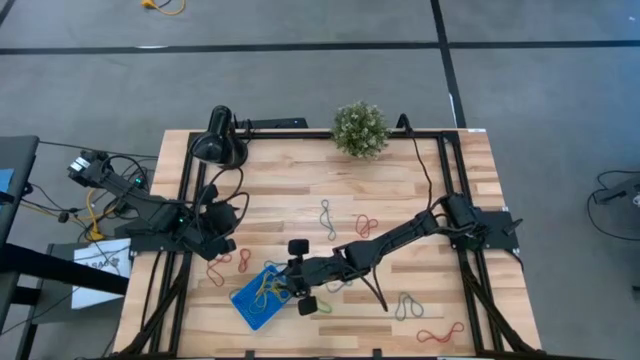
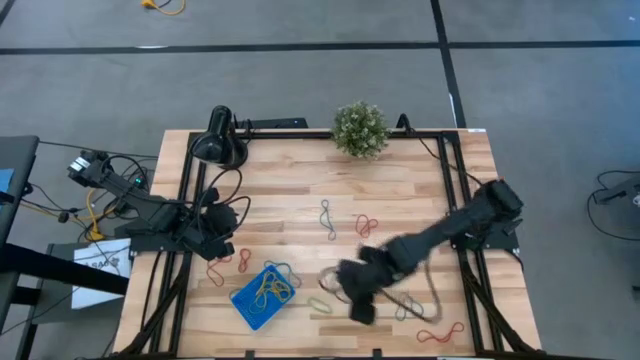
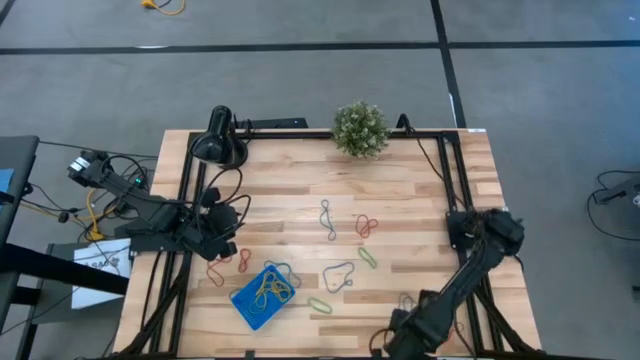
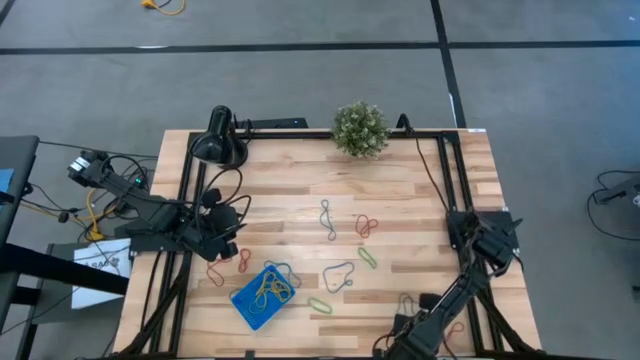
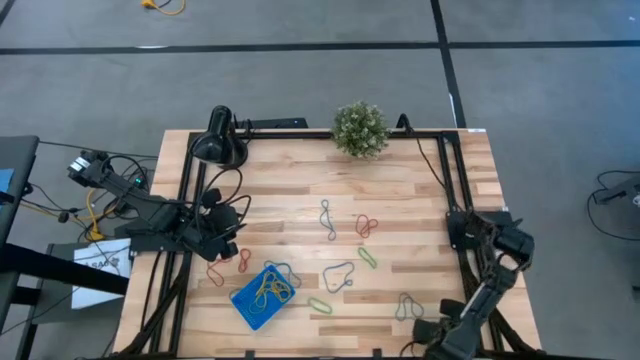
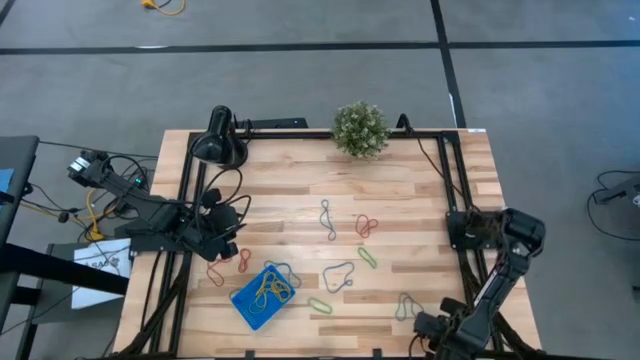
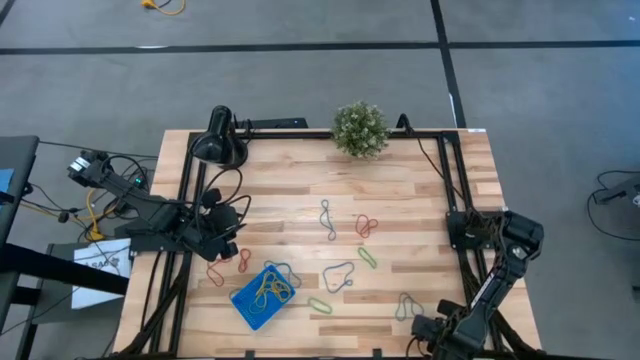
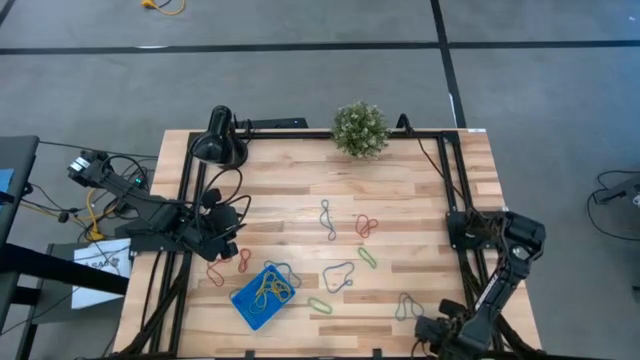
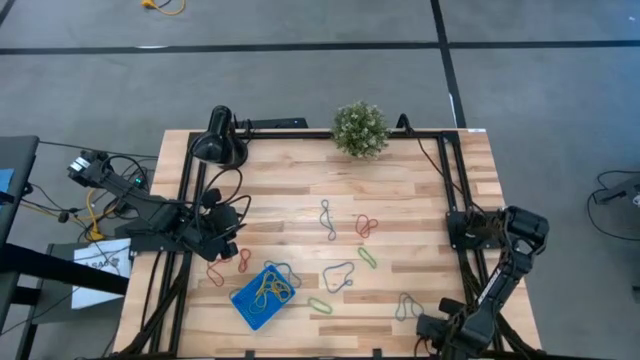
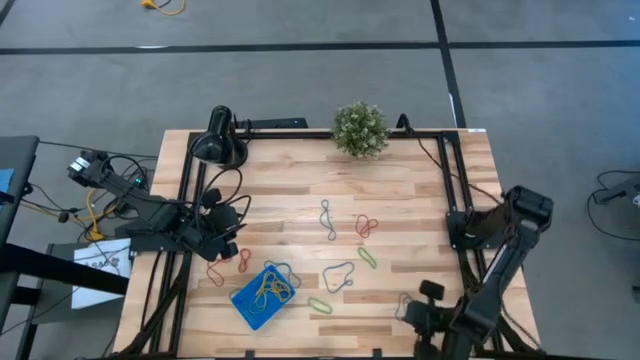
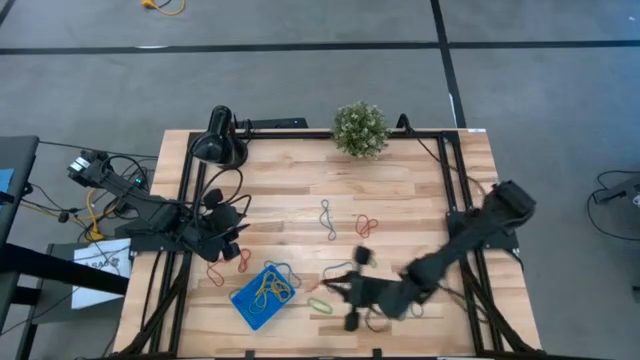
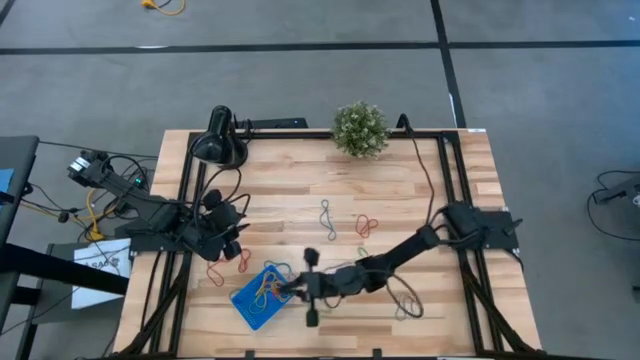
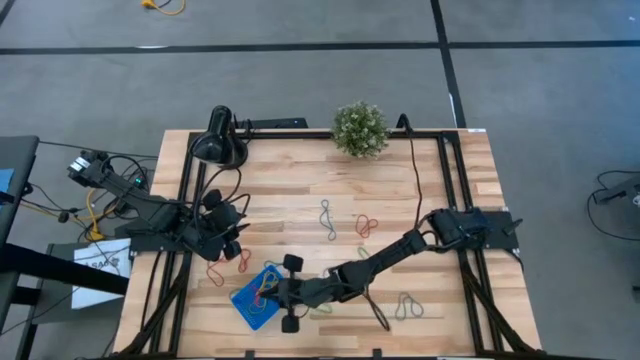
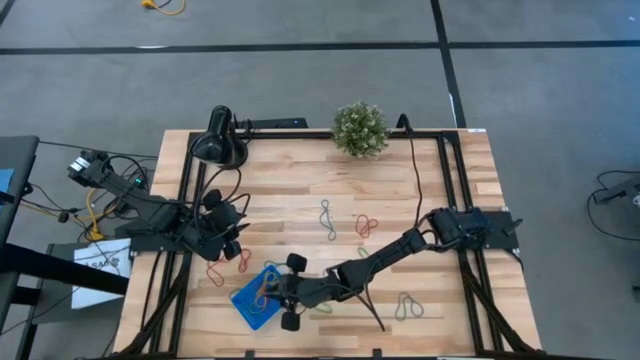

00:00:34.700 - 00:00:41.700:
Task: Pick and place rubber bands into bin
Put the red rubber band into the blue basket

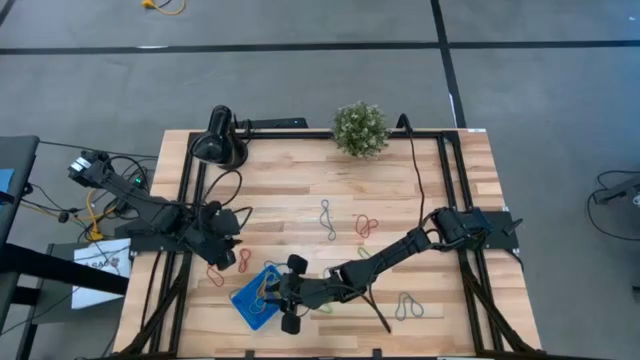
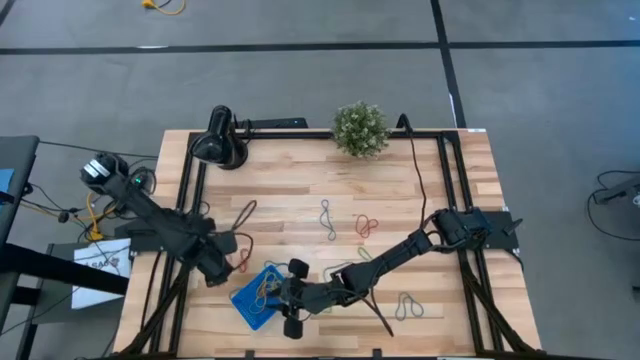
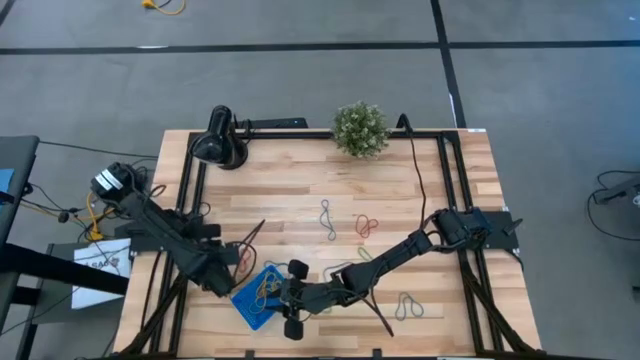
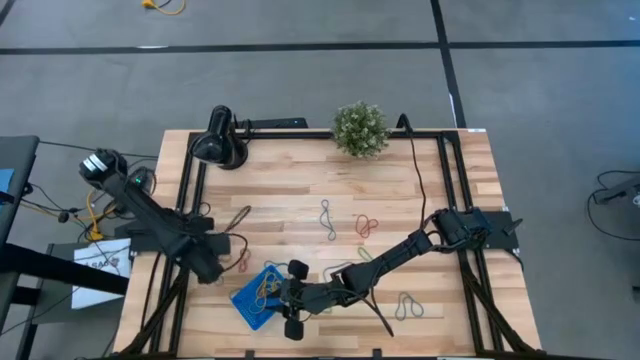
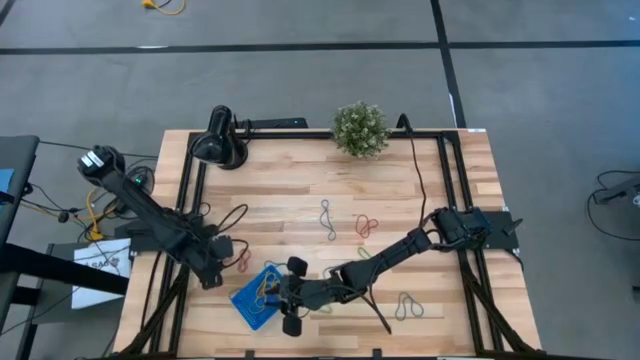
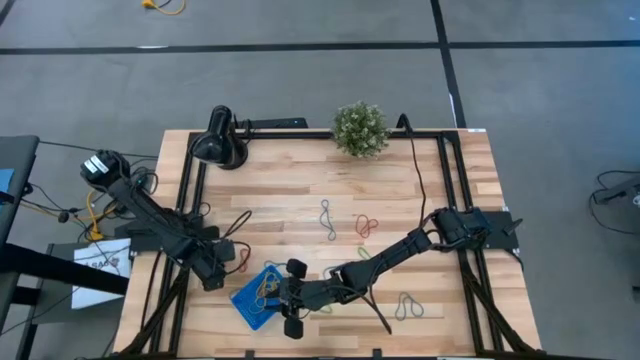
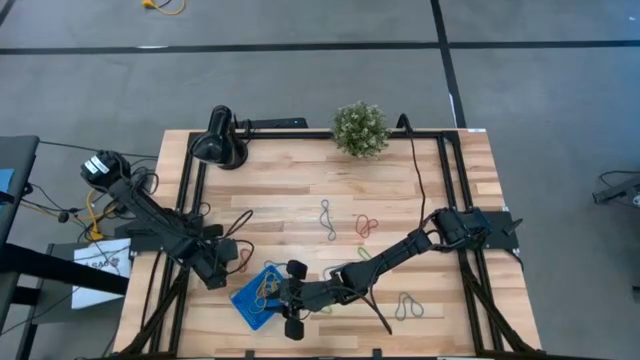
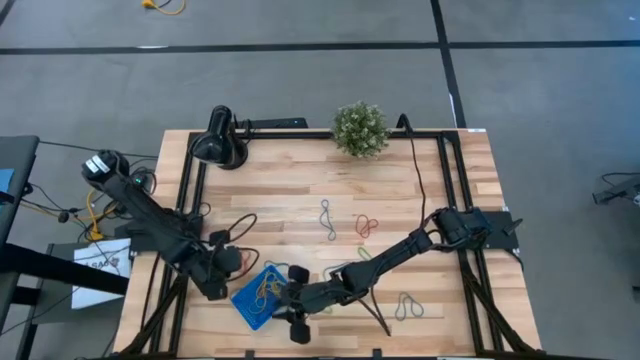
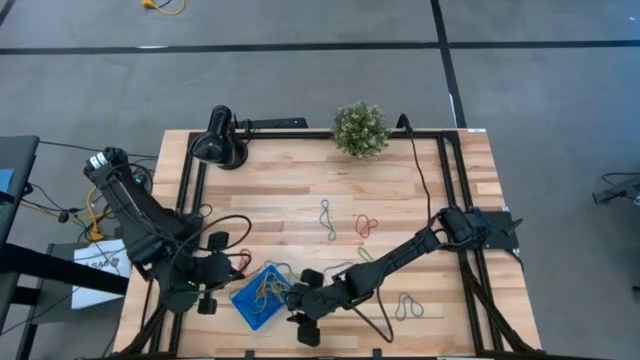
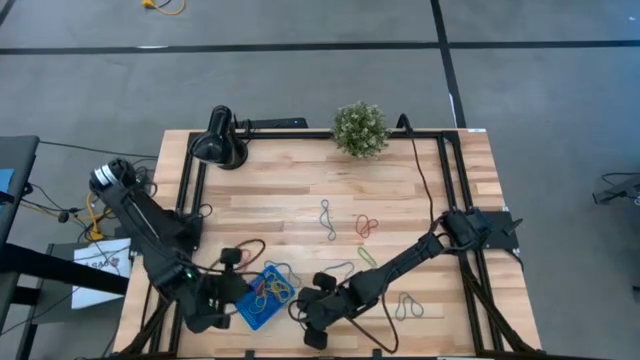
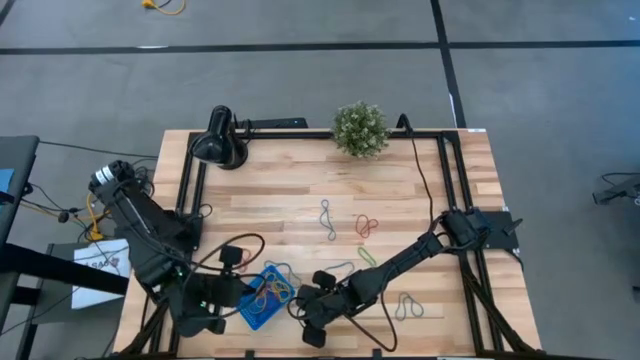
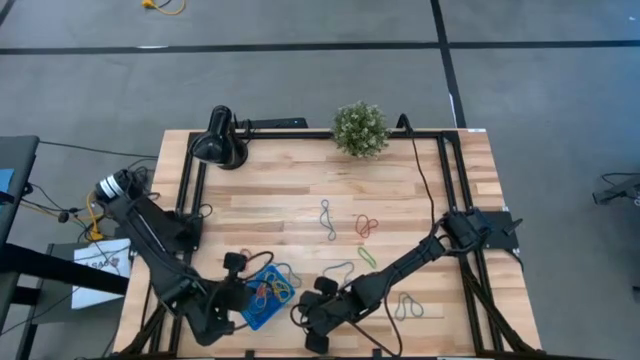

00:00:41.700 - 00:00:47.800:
Put the red rubber band into the blue basket

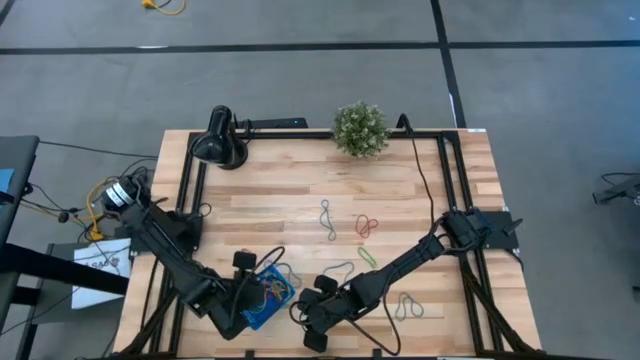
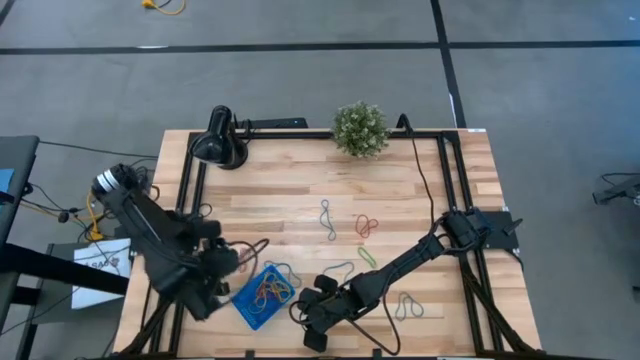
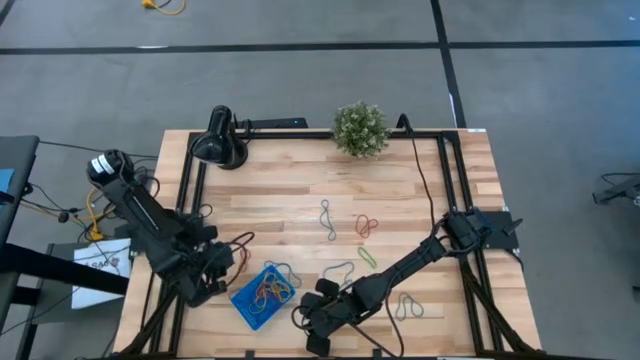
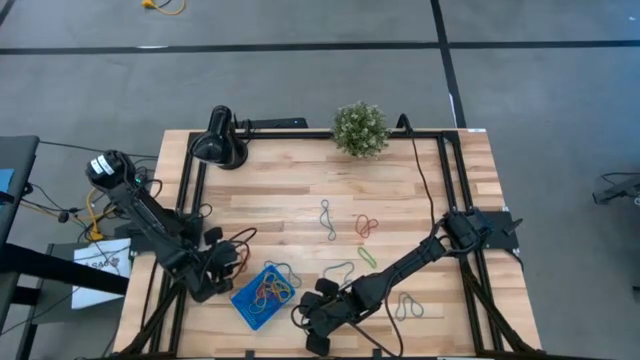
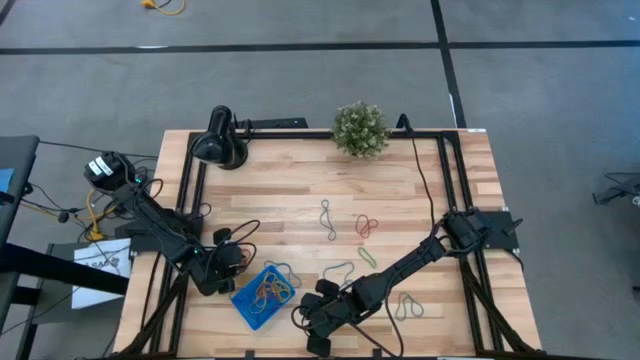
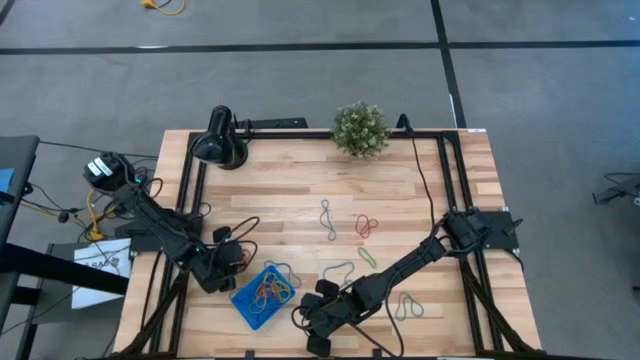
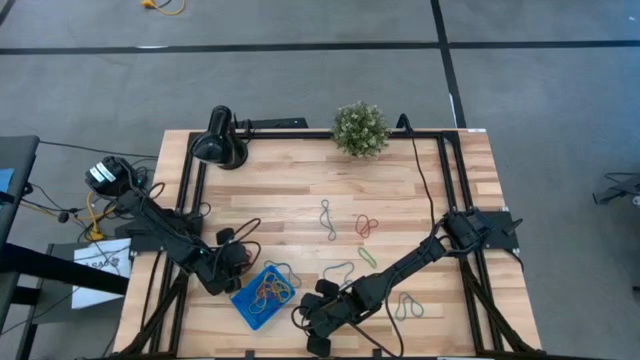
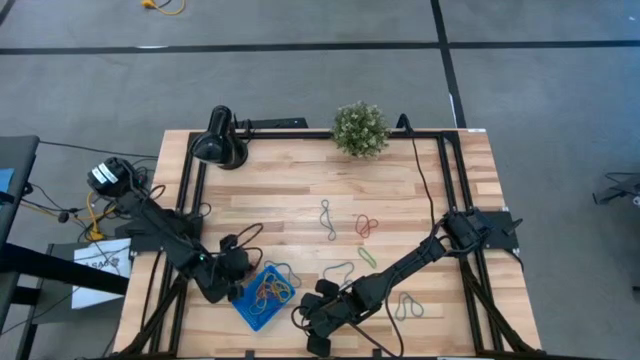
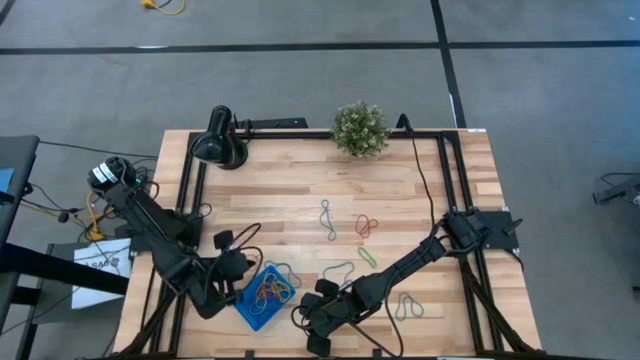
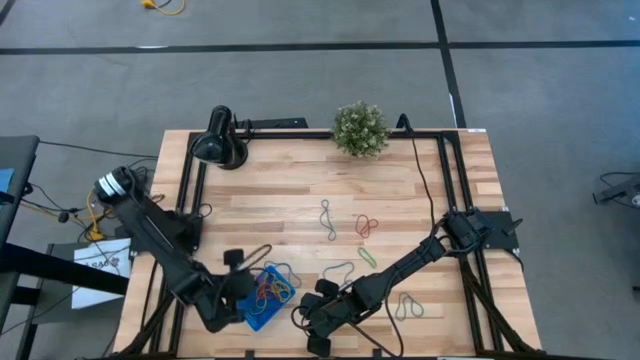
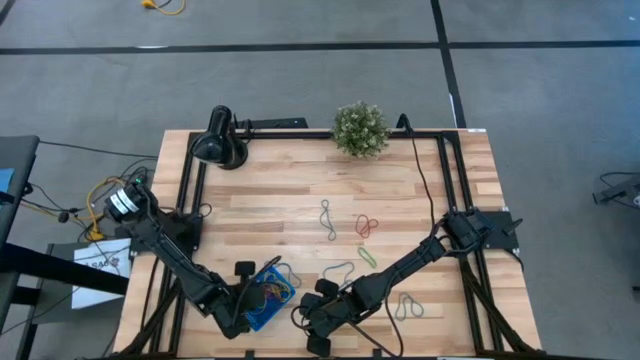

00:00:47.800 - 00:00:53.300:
Put the red rubber band into the blue basket

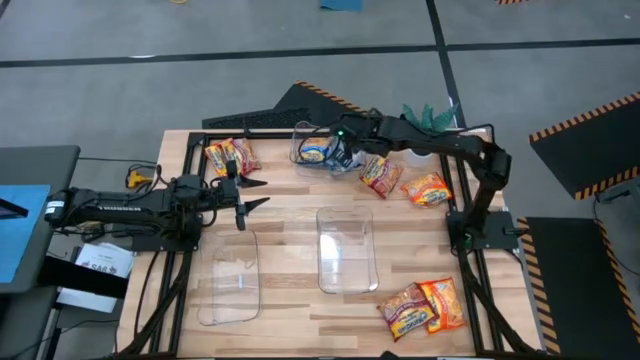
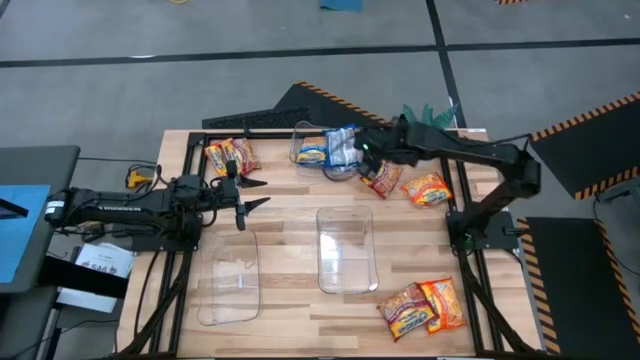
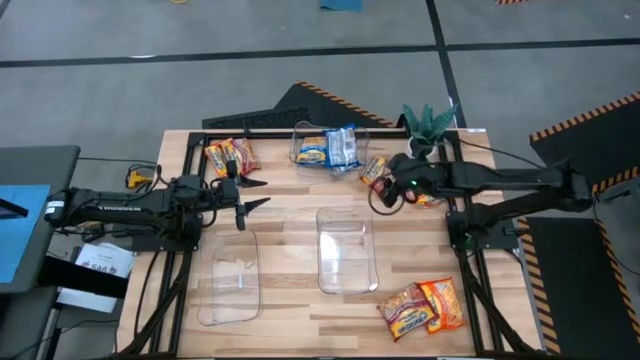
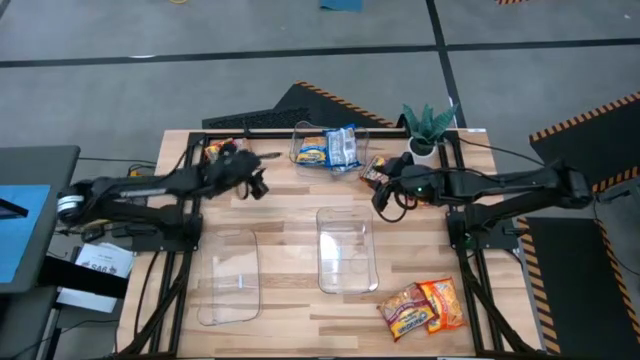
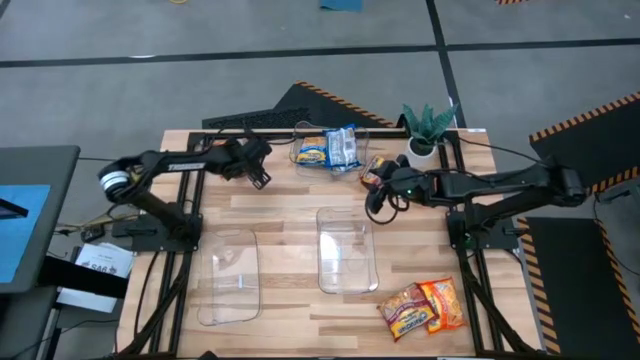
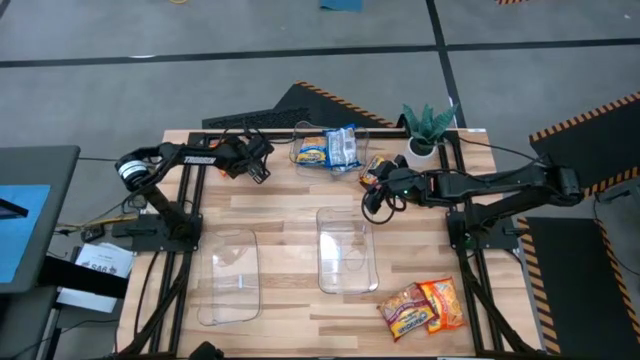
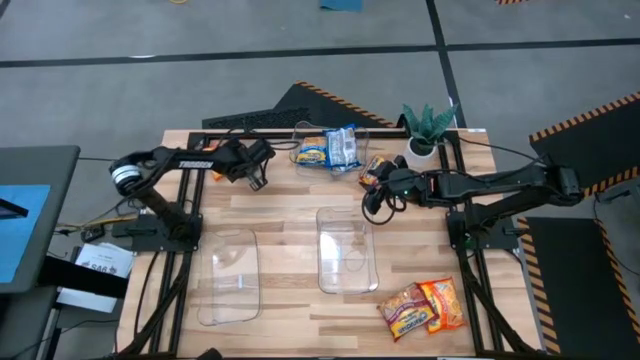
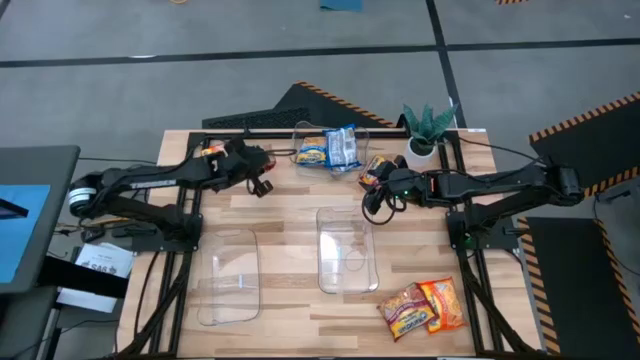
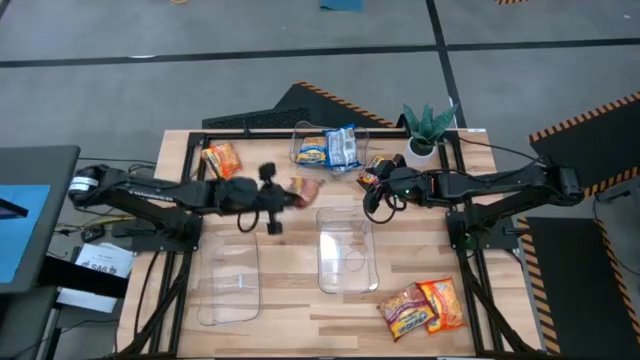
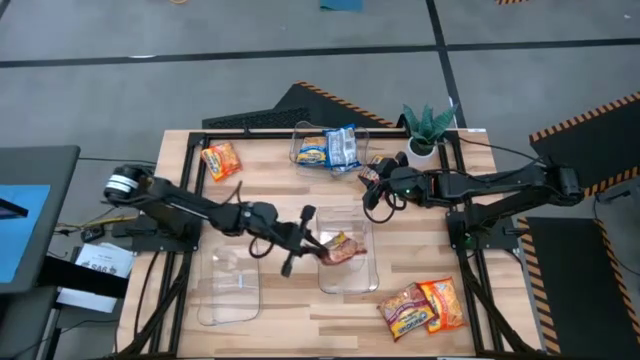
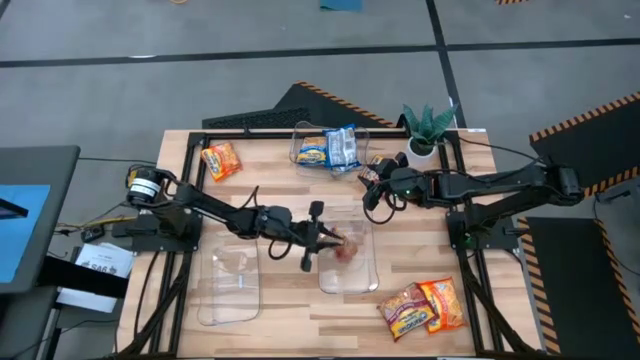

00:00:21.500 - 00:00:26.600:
Task: Sort Maruchan noodles
Put the top left red noodle pack into the right transparent bin
